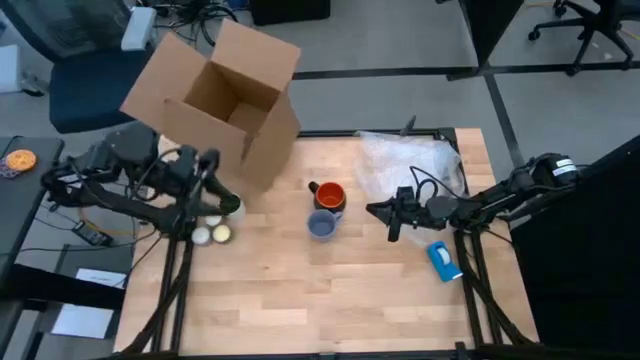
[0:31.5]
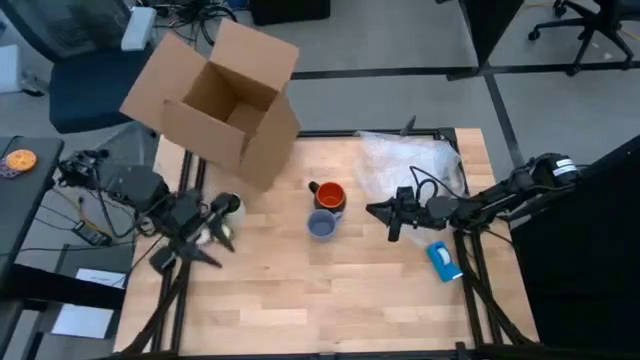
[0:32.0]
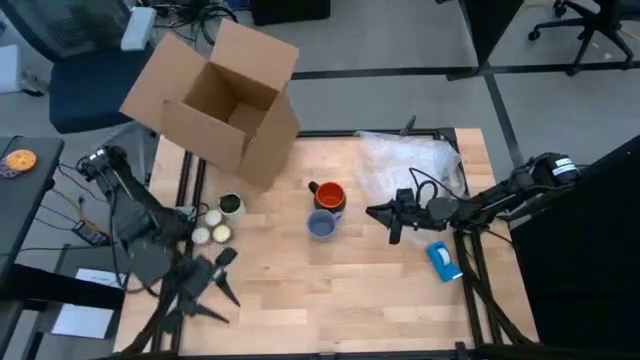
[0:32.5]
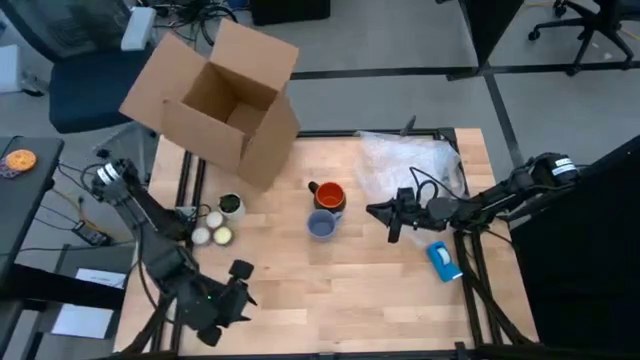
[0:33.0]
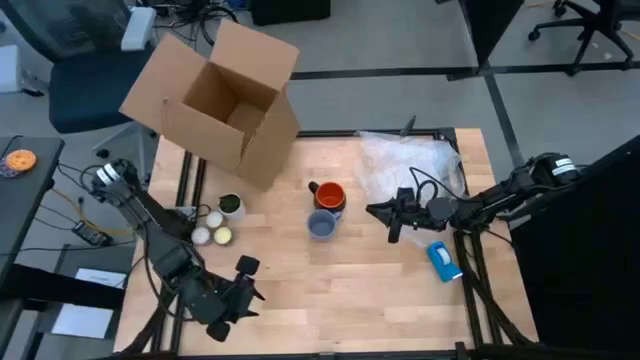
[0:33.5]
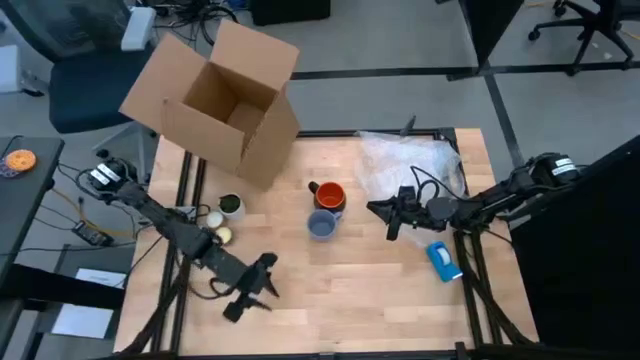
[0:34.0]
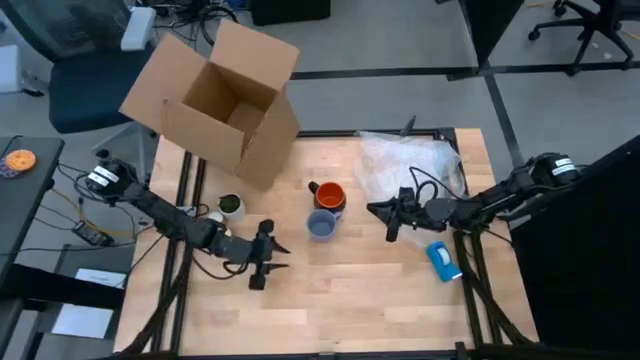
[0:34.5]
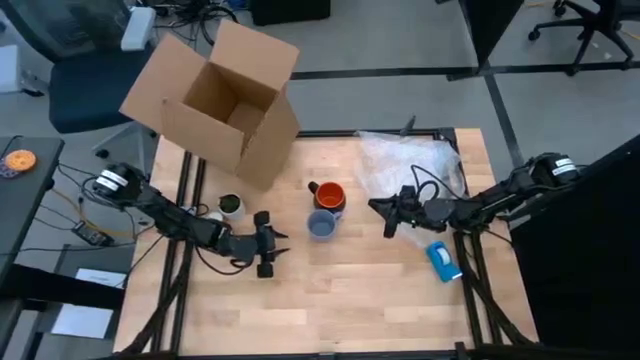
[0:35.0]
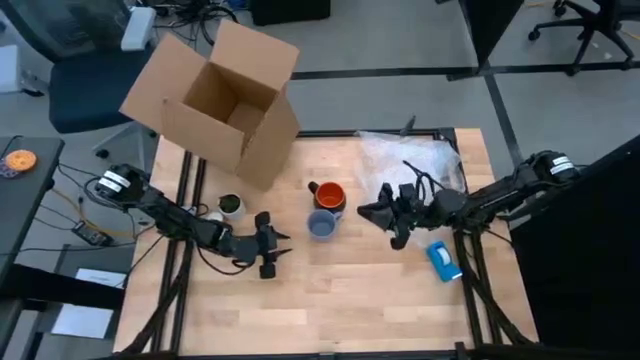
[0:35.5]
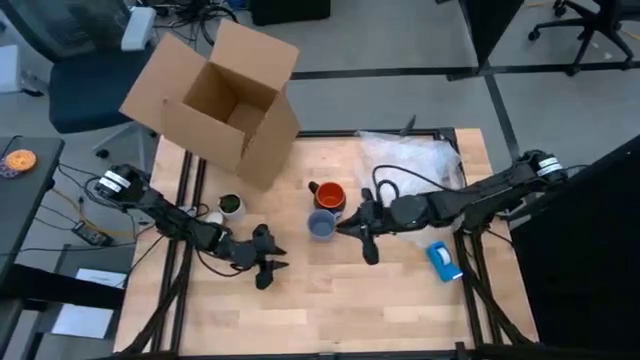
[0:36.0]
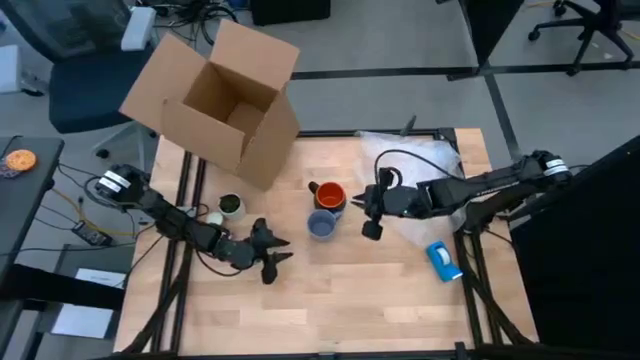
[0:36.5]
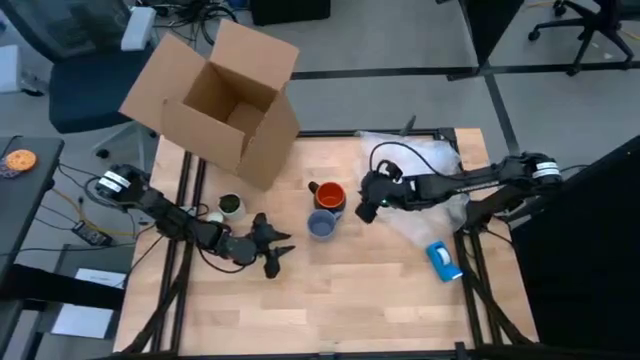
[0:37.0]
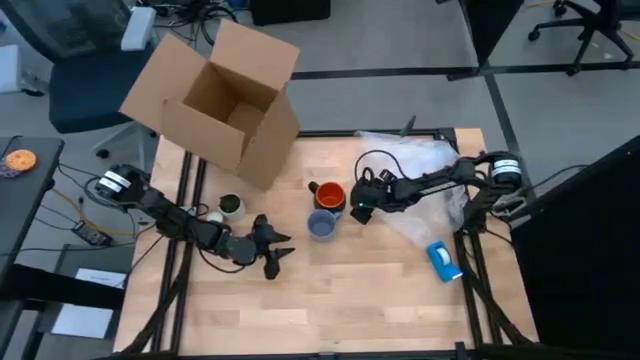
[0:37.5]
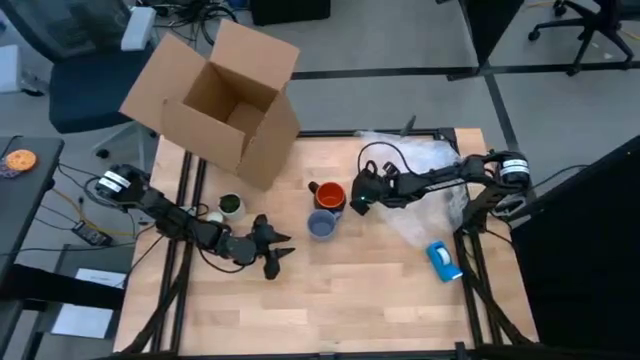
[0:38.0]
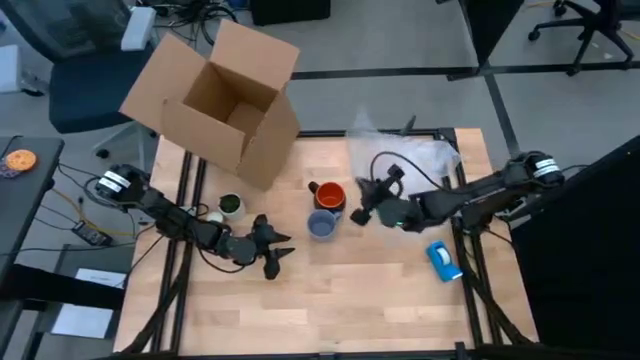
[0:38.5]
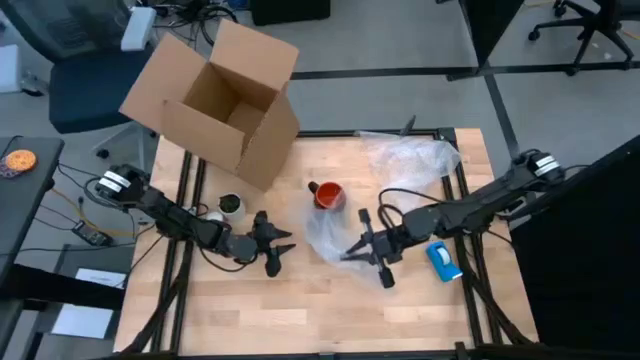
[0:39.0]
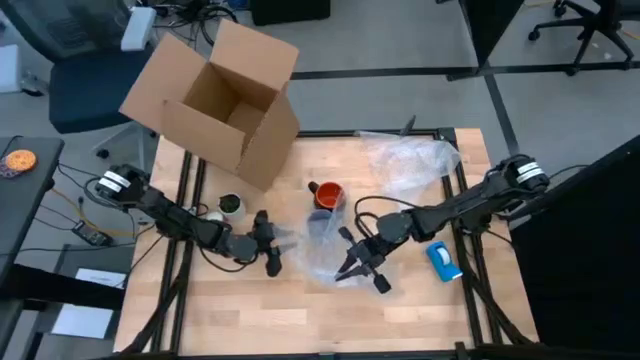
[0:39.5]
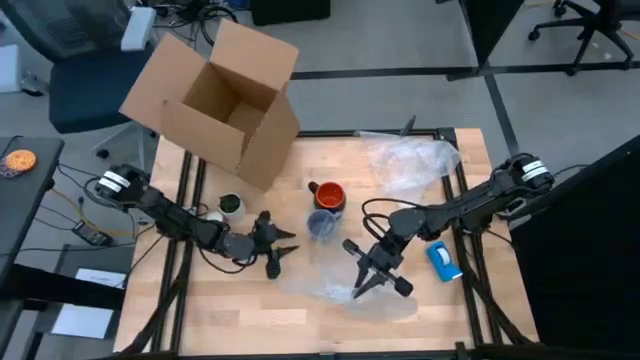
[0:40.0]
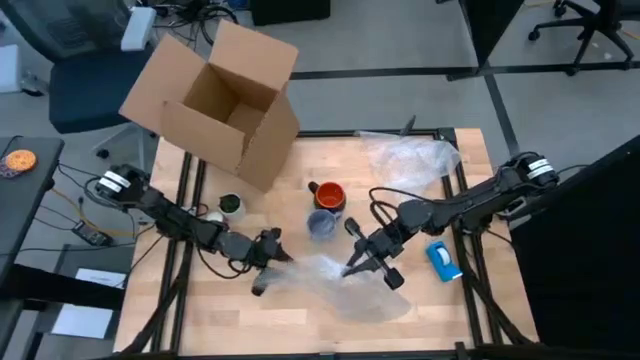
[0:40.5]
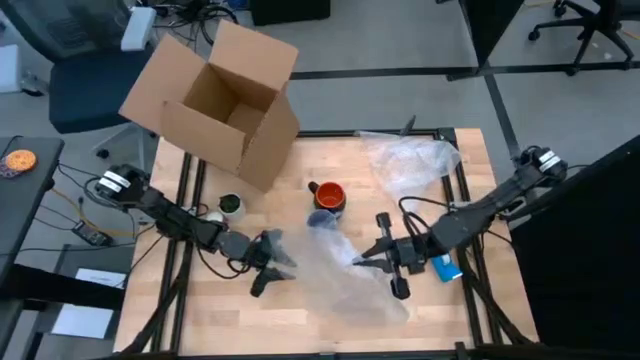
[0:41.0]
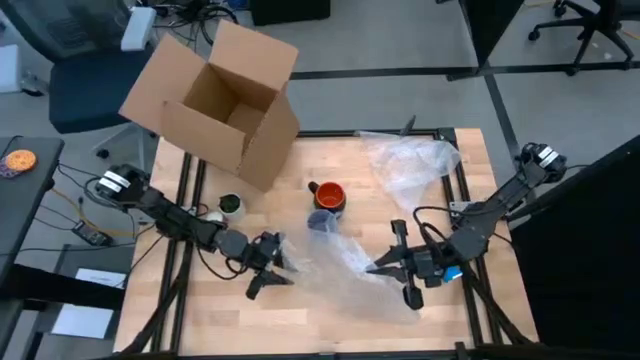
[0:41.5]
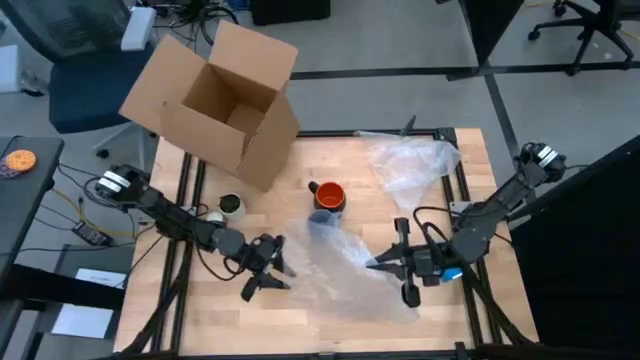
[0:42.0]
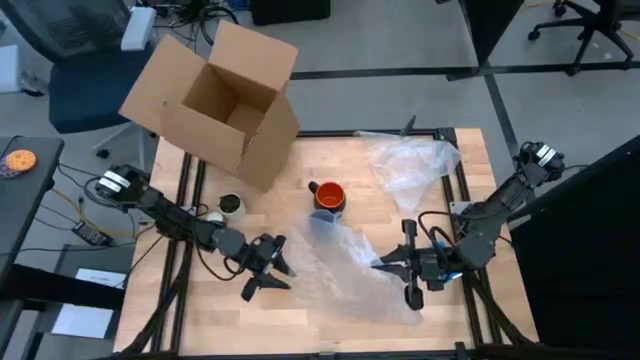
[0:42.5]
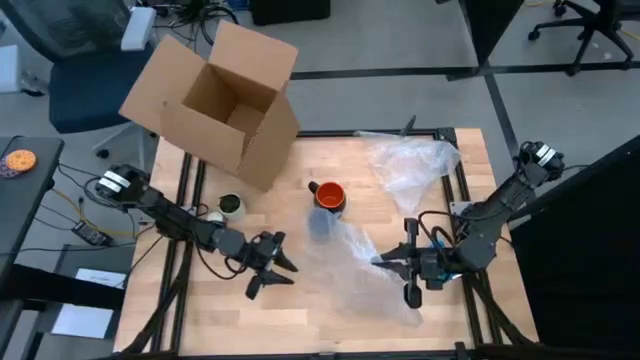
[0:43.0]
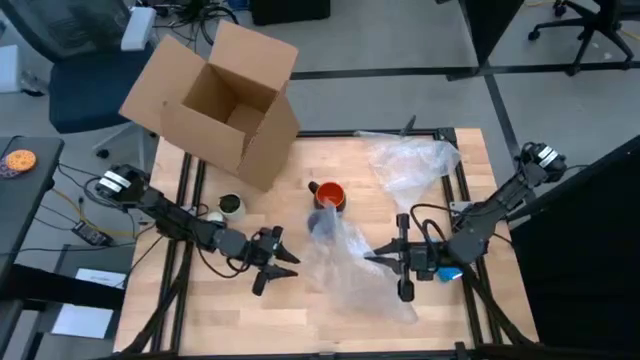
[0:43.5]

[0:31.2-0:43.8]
Task: wrap mug
Prepare the bubble wrap

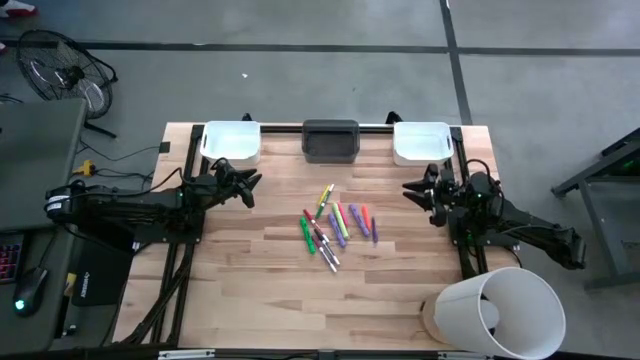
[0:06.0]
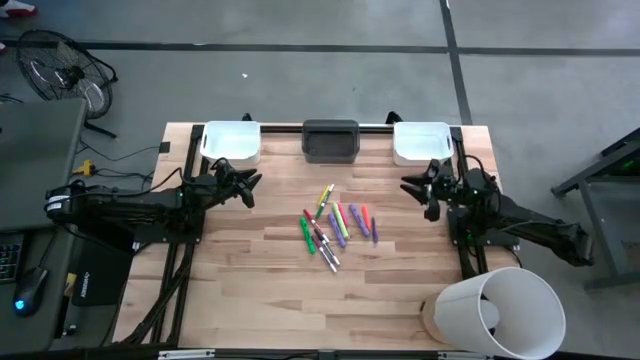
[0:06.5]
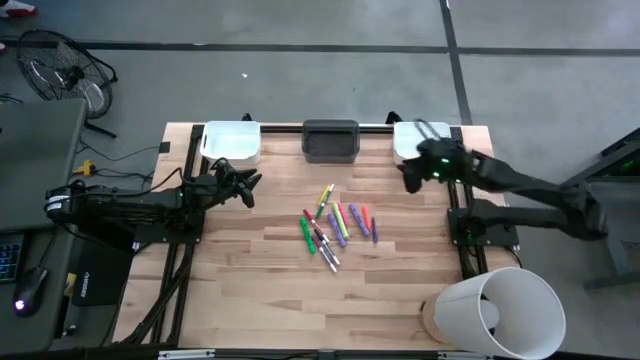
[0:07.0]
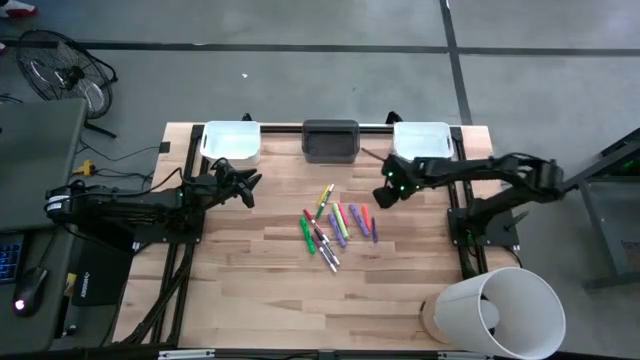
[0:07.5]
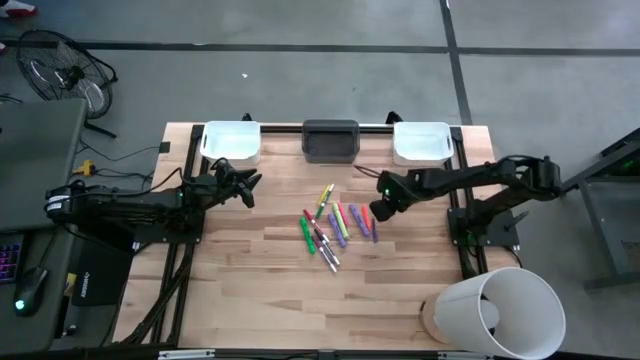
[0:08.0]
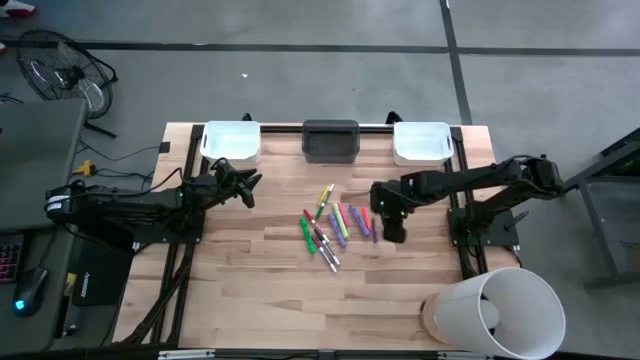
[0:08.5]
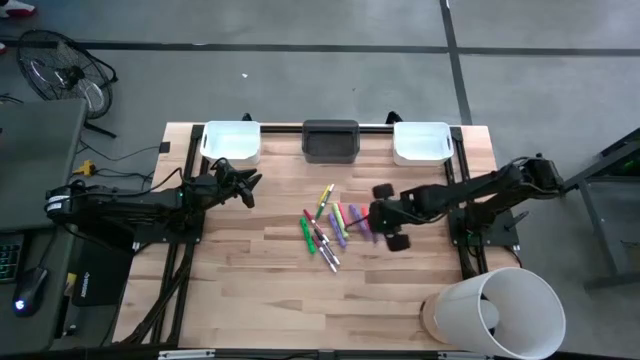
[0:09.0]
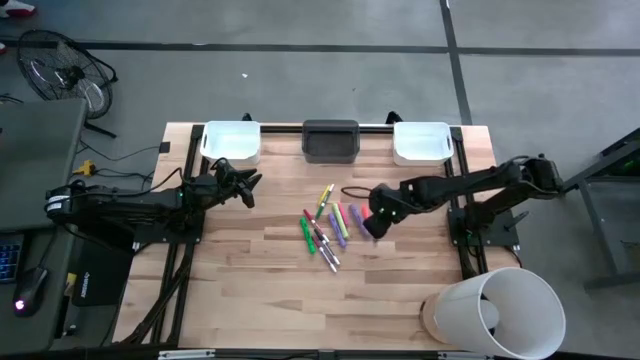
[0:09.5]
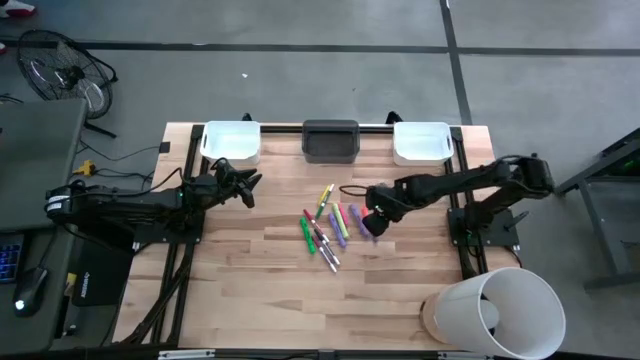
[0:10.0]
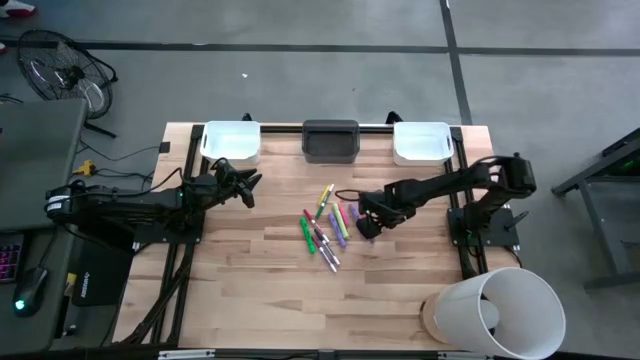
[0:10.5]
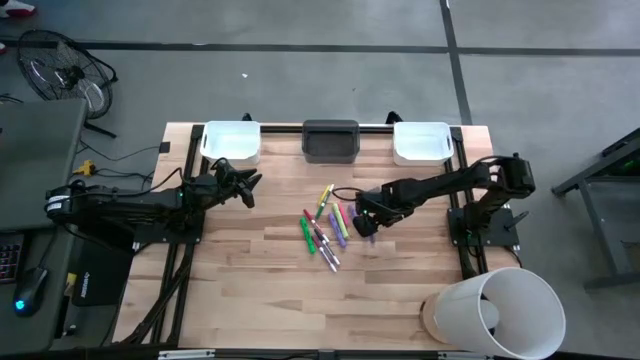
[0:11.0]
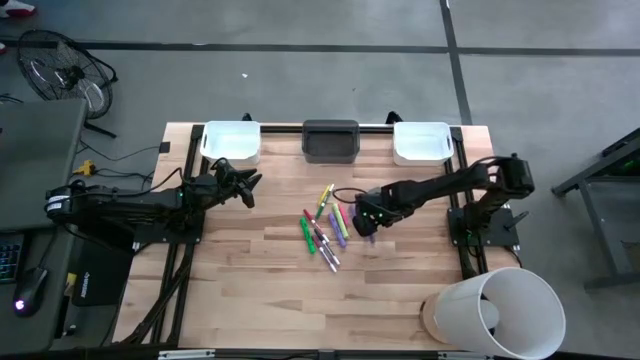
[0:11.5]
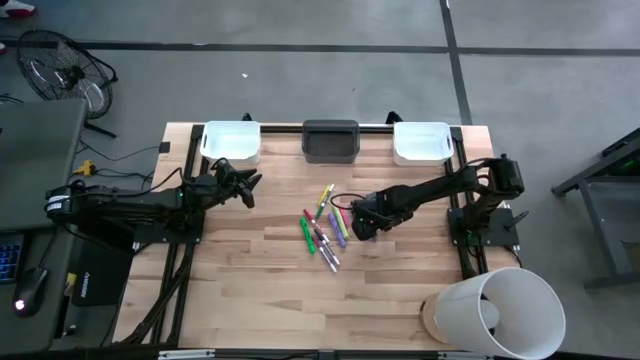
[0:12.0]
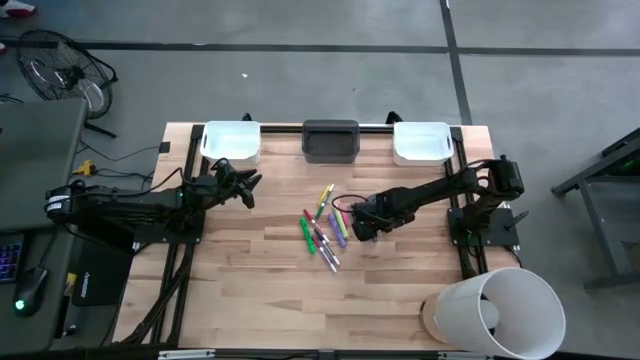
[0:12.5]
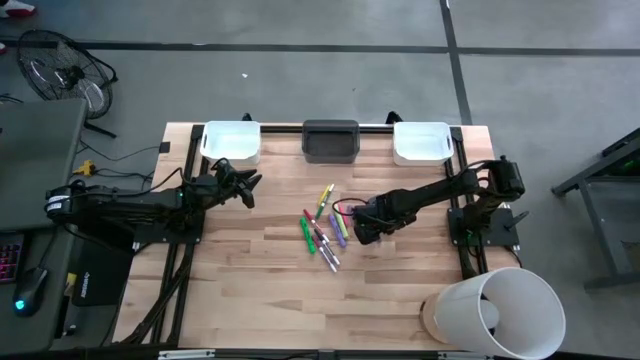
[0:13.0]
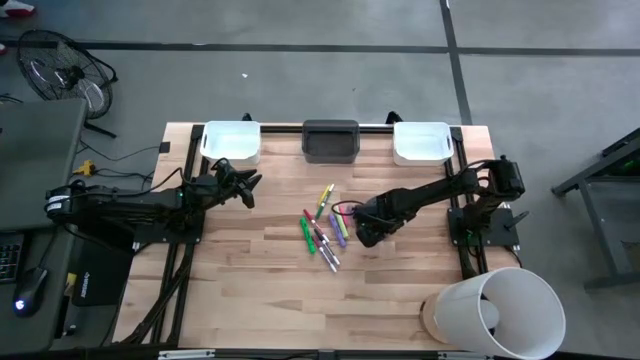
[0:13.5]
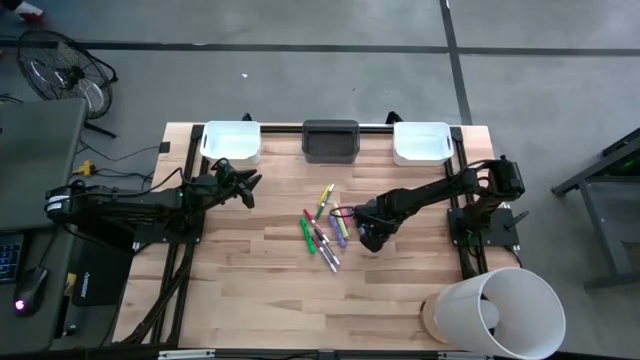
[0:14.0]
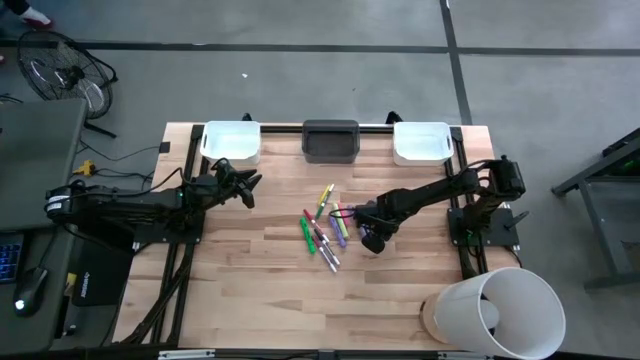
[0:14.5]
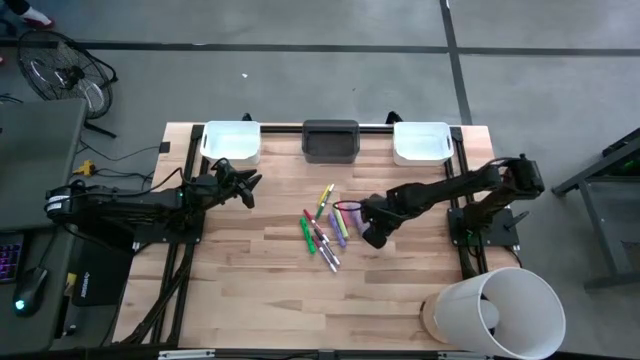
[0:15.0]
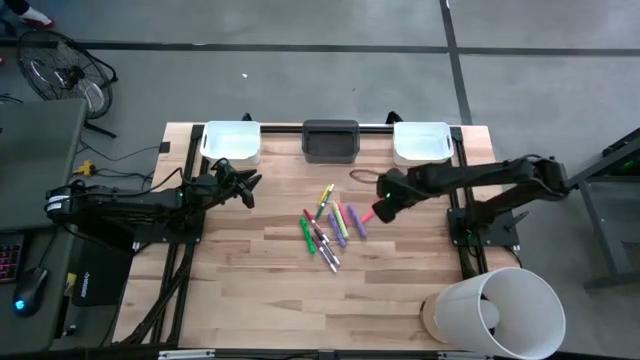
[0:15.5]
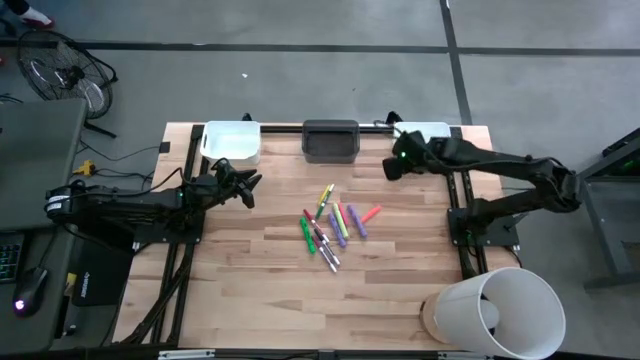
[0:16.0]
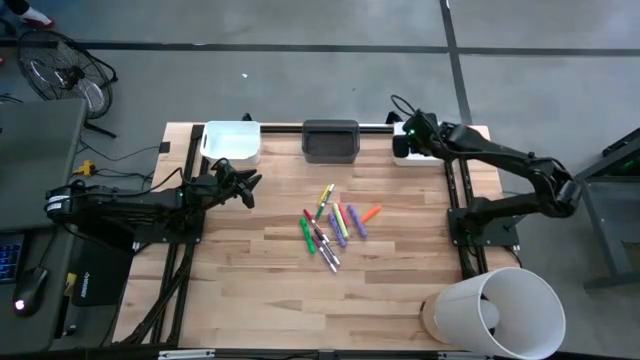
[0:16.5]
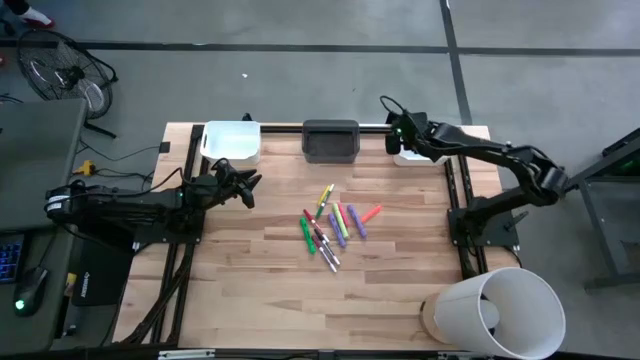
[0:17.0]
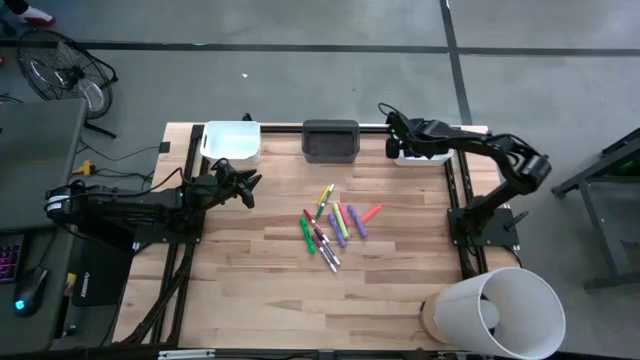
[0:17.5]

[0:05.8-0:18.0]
Task: Pick & Place Markers
Put the violet pen into the right white bin
